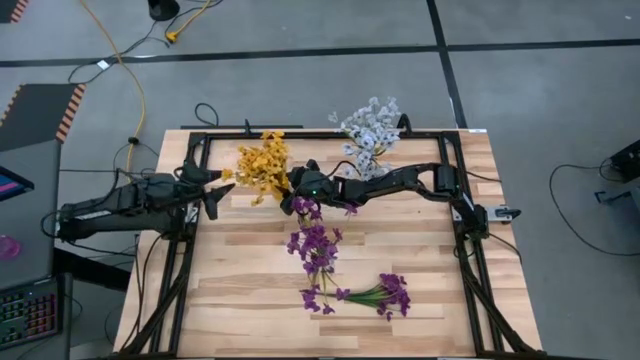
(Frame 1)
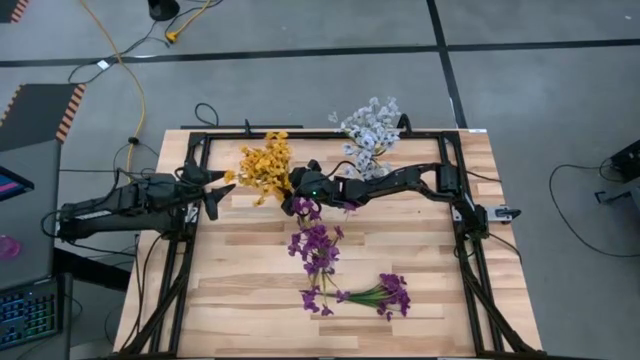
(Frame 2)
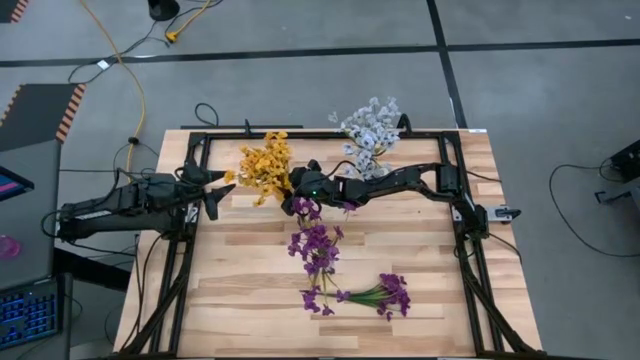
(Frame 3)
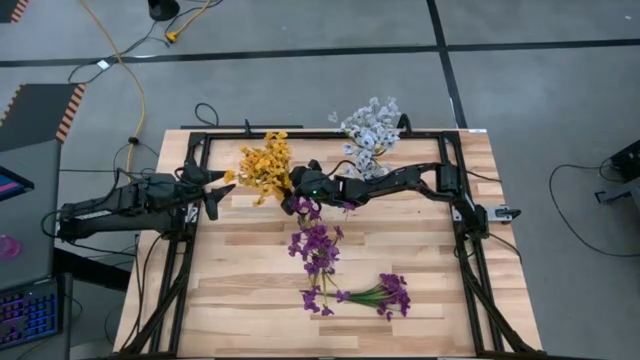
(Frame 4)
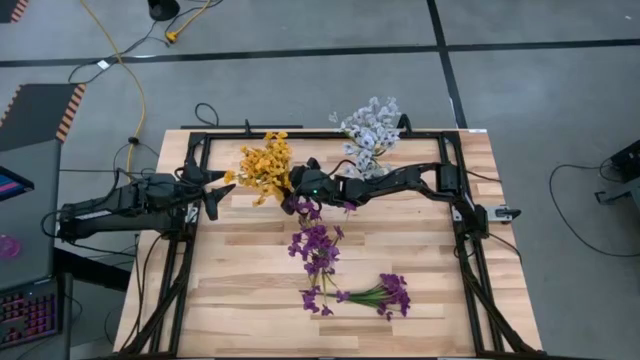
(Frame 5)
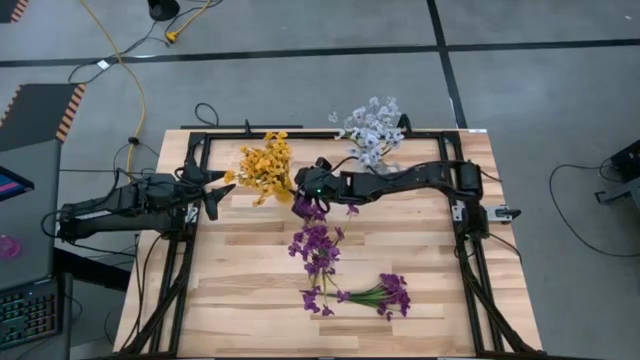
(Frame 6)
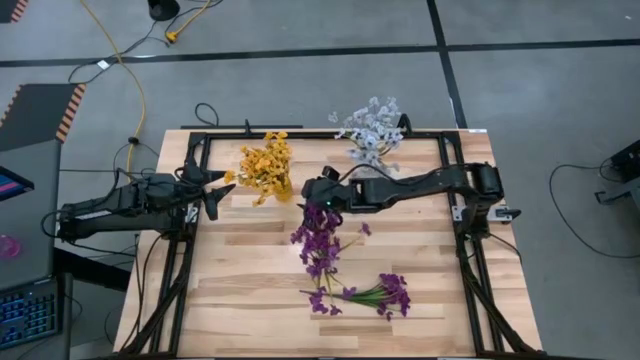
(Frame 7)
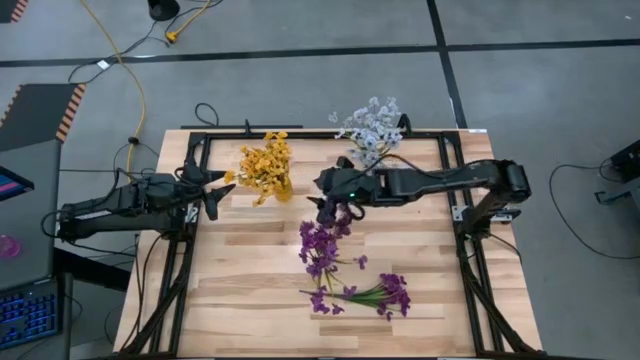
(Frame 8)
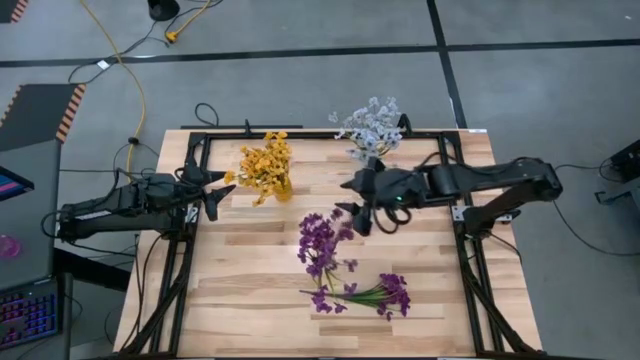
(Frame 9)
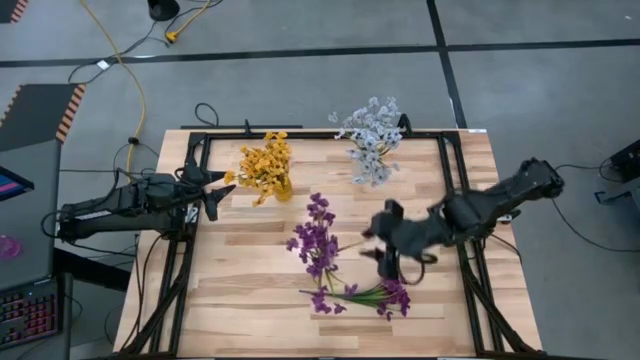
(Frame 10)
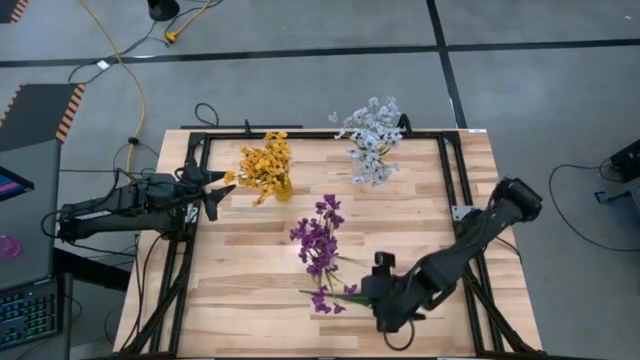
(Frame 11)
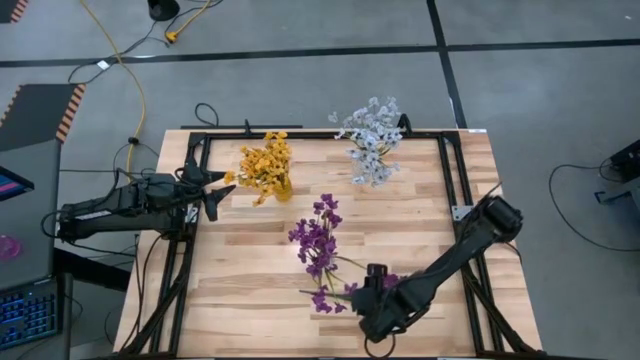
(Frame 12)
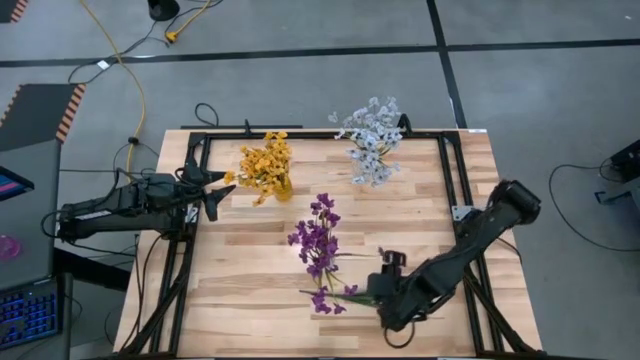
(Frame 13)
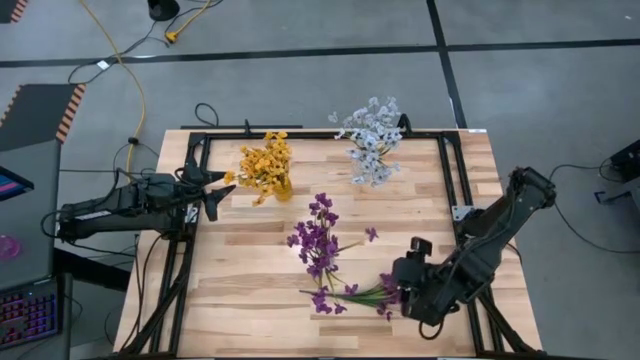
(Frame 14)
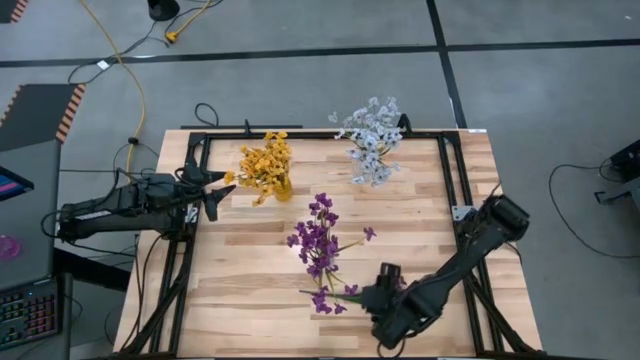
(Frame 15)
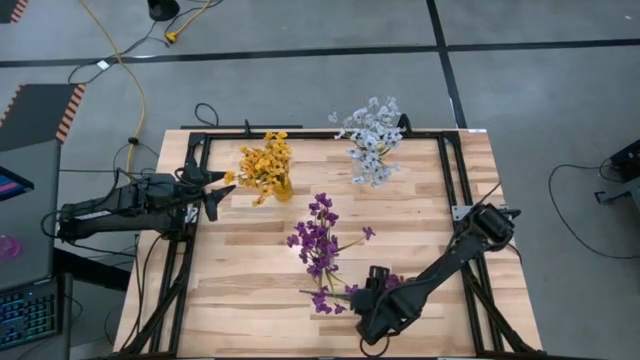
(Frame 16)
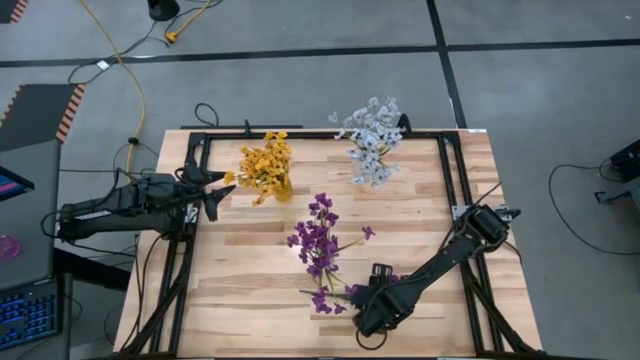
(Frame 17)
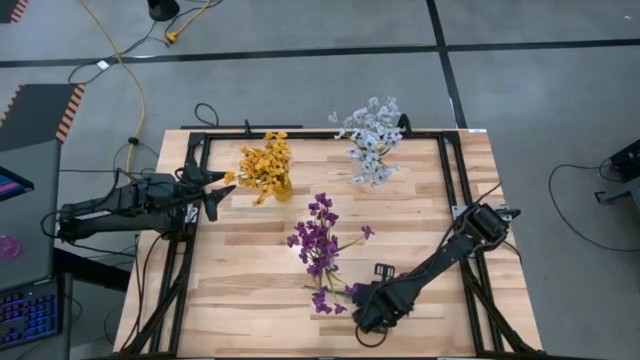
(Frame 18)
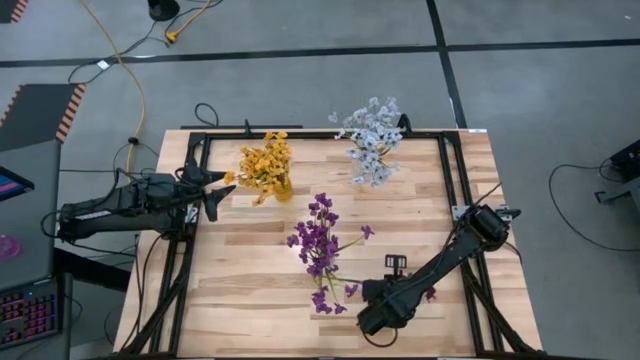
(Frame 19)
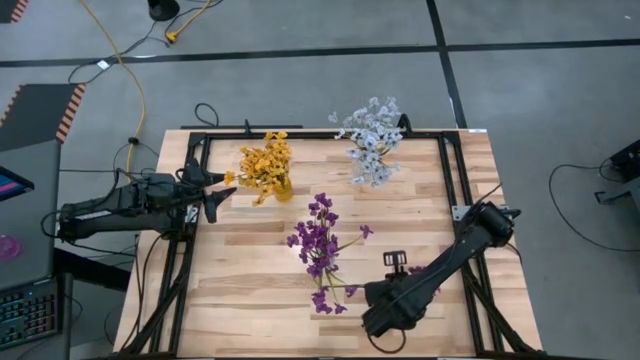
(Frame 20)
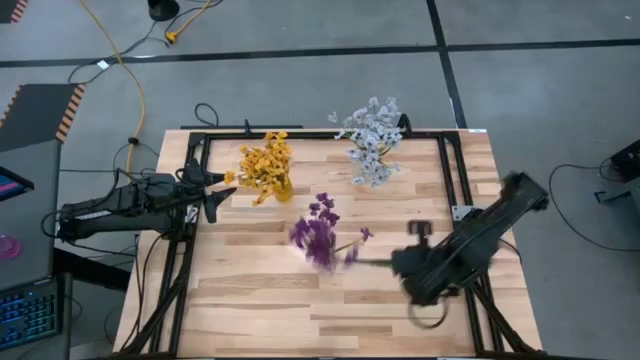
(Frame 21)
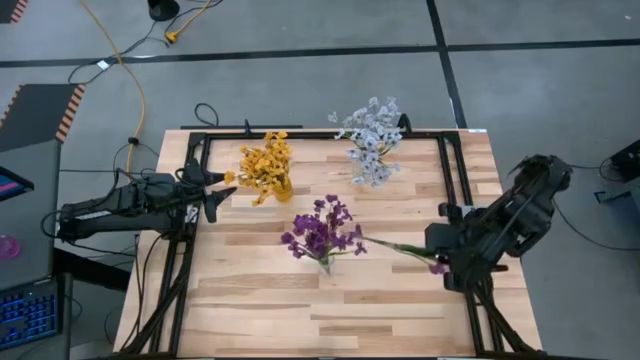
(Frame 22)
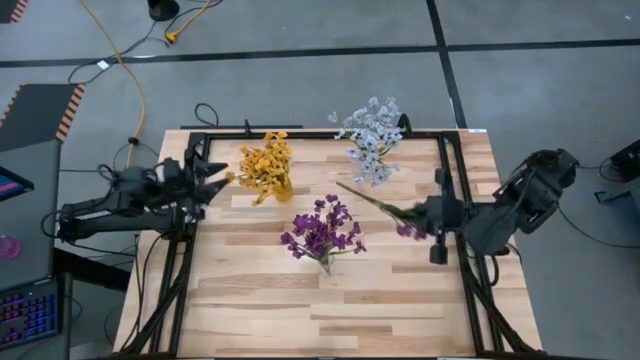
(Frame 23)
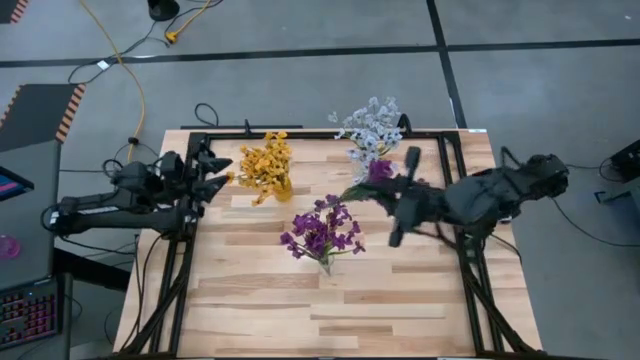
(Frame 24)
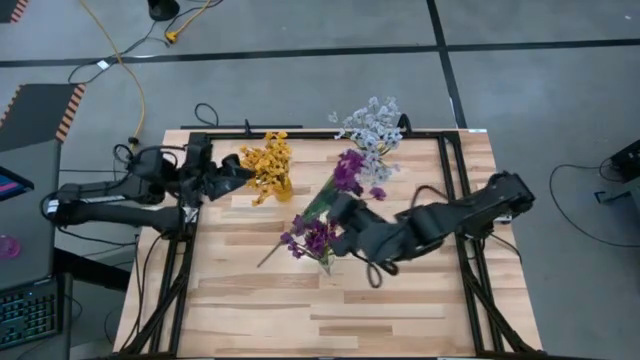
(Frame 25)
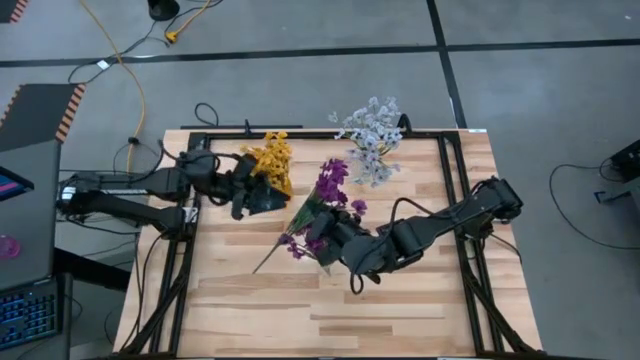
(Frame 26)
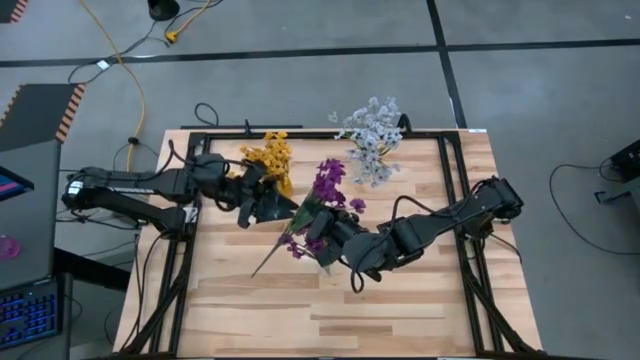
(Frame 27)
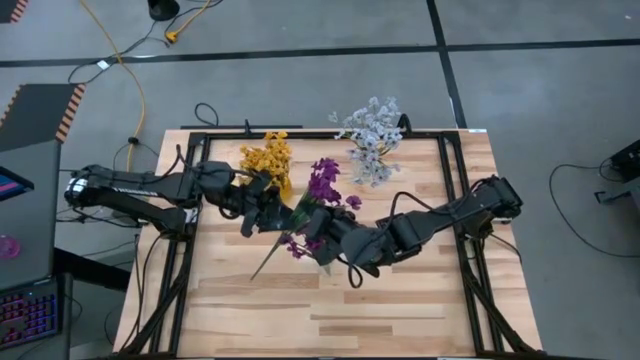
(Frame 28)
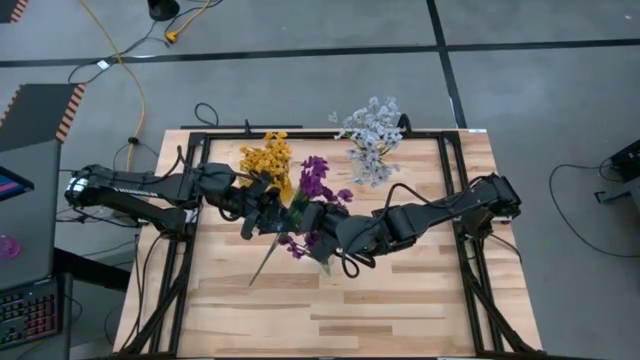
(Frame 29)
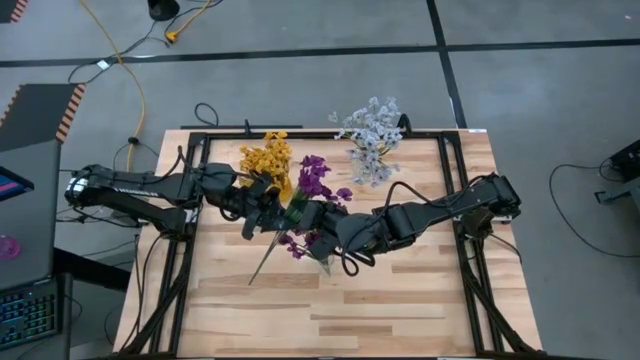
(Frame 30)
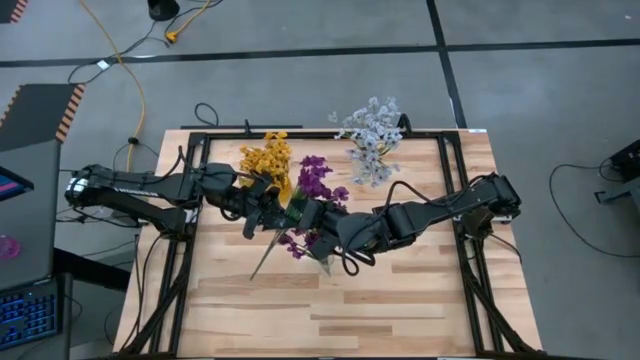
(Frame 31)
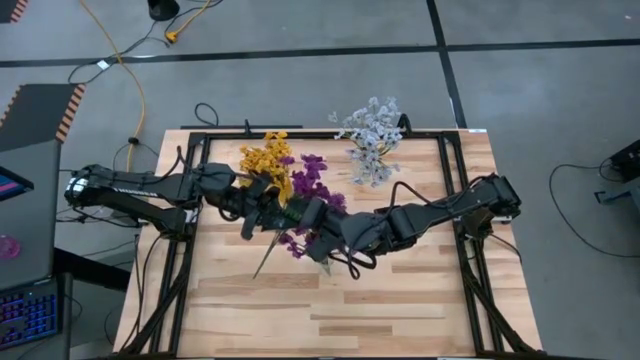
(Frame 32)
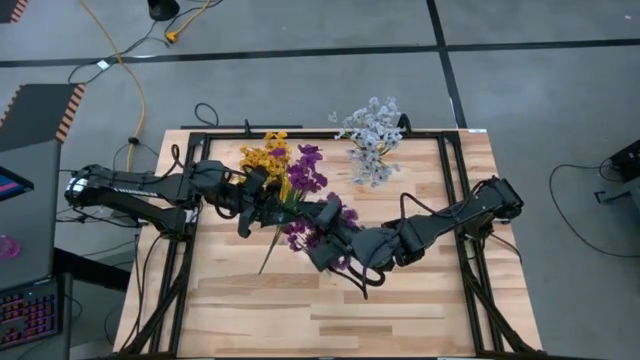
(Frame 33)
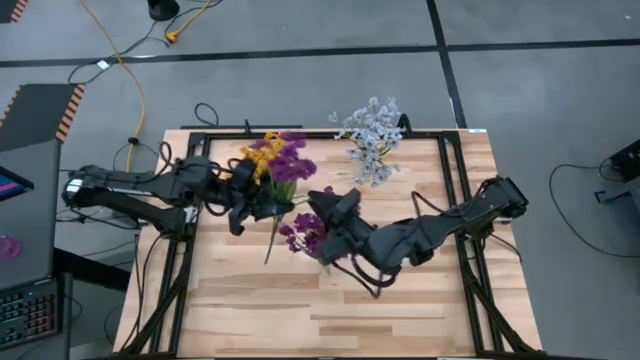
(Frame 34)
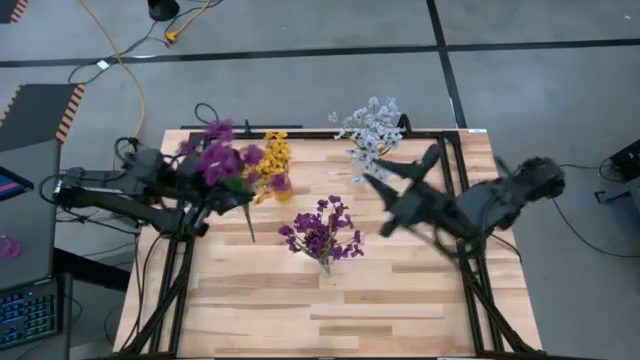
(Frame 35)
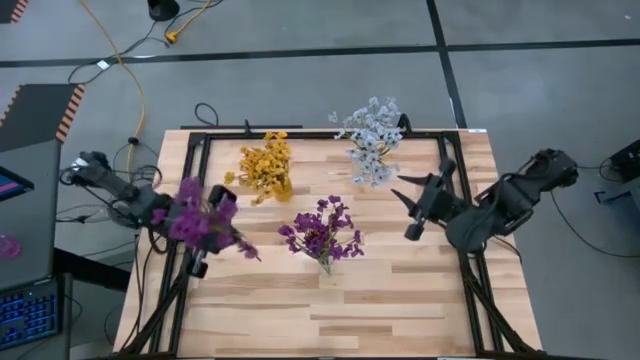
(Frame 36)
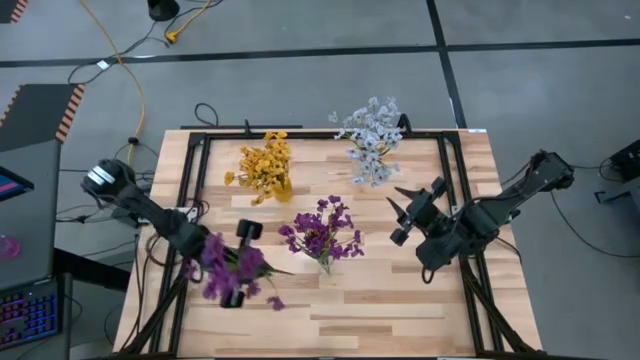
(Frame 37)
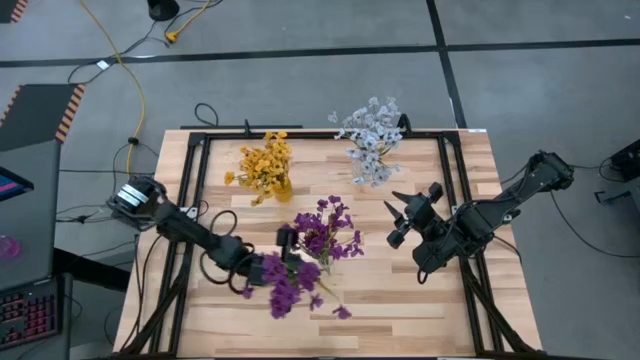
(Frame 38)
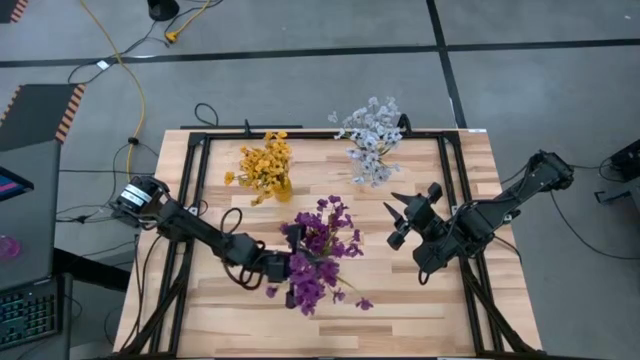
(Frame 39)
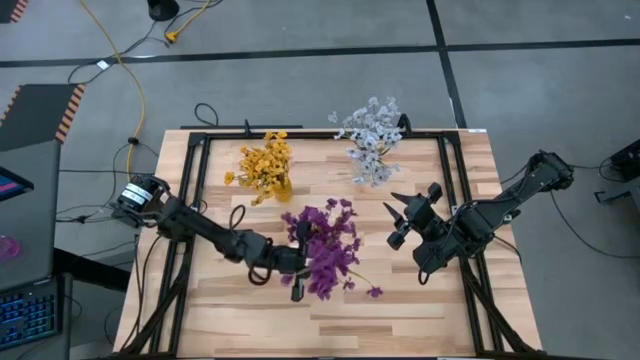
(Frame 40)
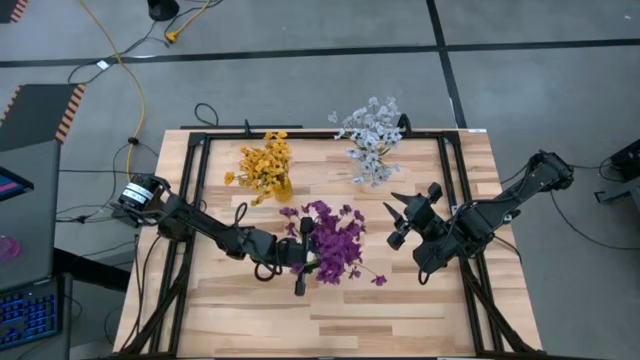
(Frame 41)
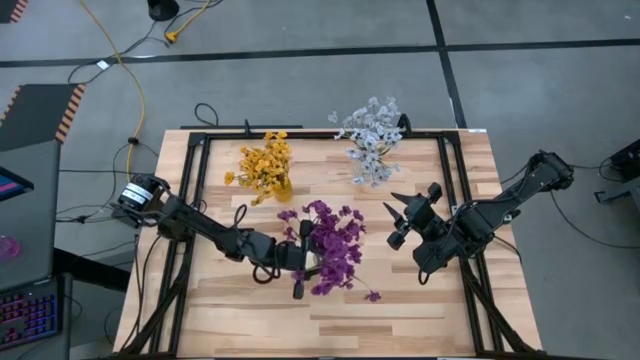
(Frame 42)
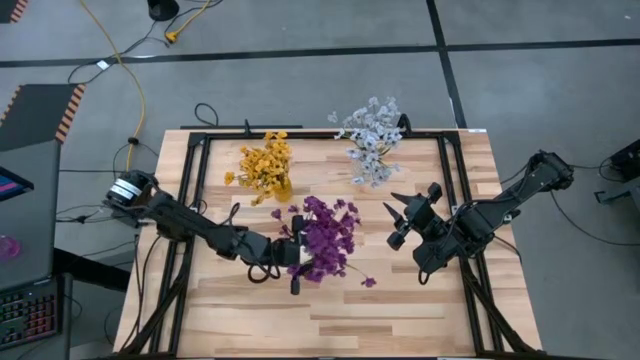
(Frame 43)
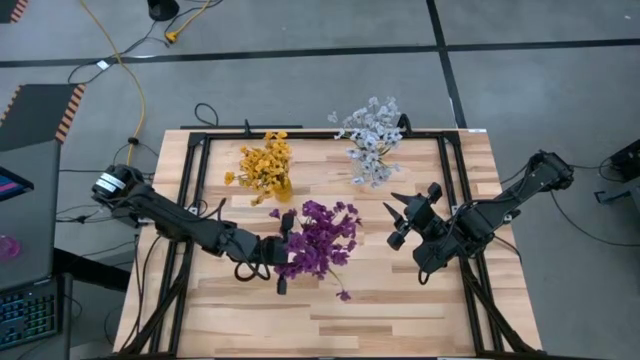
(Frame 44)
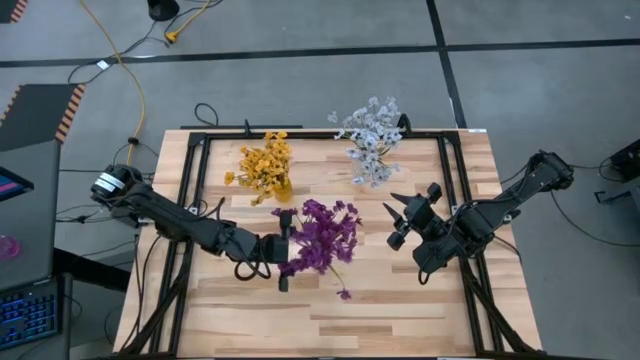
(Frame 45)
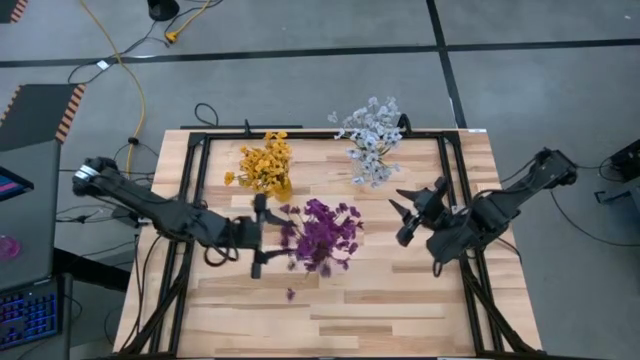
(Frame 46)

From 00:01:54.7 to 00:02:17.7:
Task: Sort flowers into vase by color
Put the violet flowers into the bottom transparent vase
